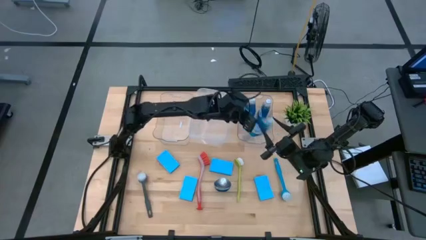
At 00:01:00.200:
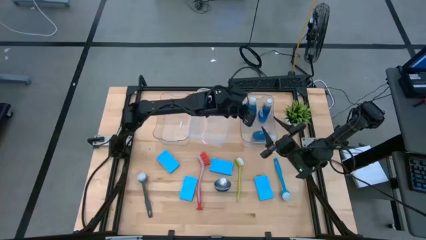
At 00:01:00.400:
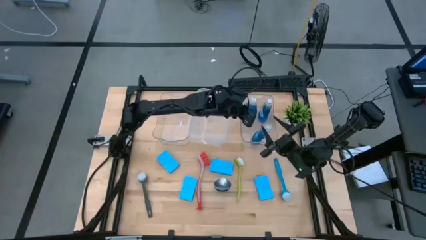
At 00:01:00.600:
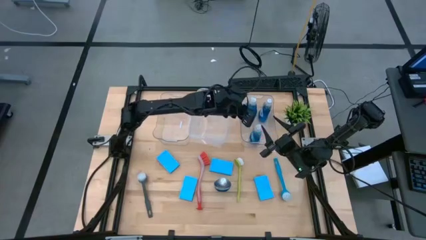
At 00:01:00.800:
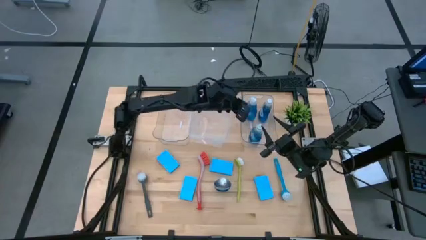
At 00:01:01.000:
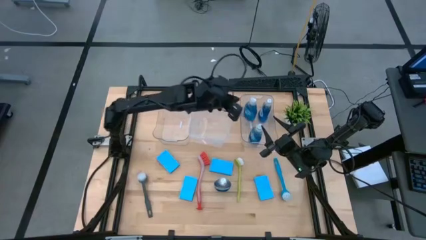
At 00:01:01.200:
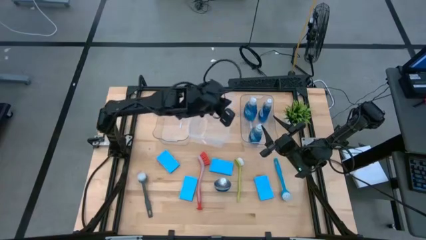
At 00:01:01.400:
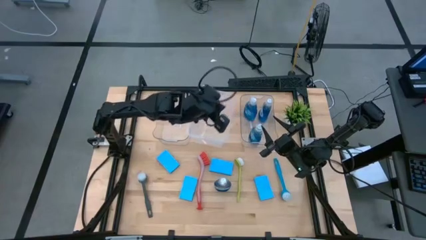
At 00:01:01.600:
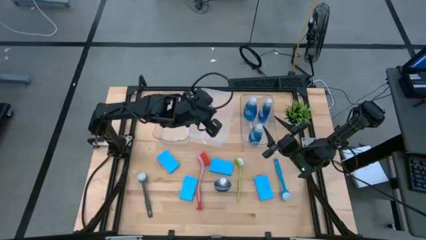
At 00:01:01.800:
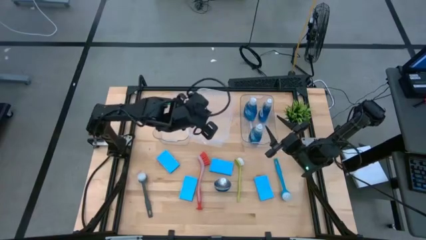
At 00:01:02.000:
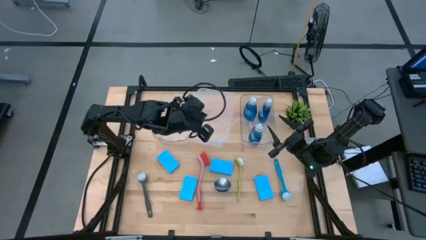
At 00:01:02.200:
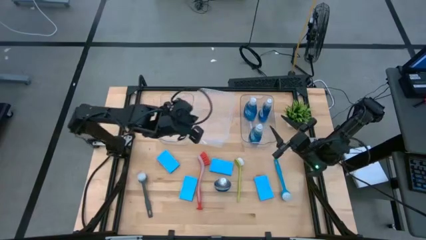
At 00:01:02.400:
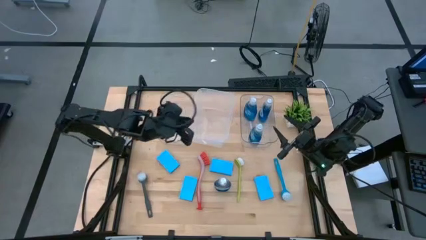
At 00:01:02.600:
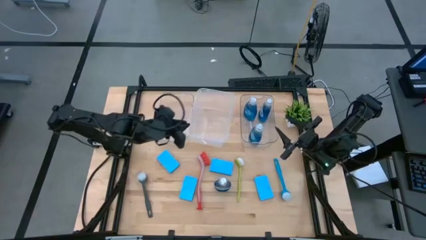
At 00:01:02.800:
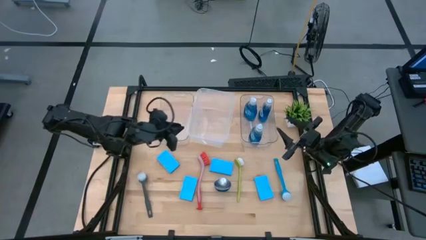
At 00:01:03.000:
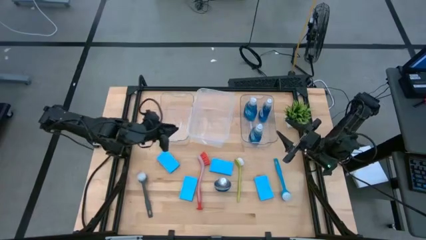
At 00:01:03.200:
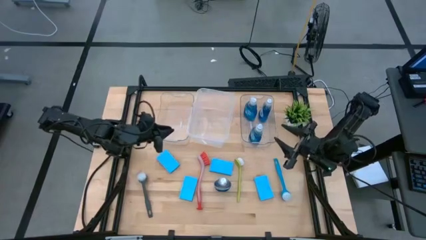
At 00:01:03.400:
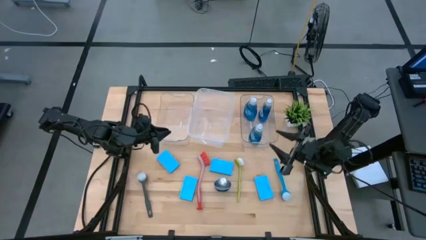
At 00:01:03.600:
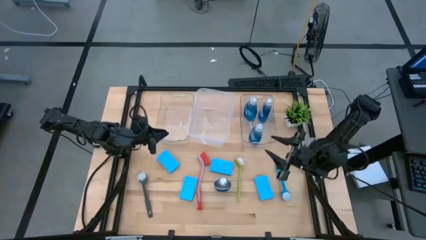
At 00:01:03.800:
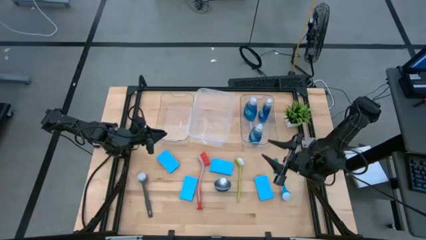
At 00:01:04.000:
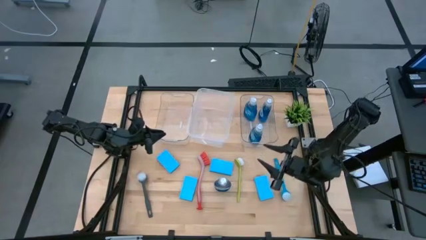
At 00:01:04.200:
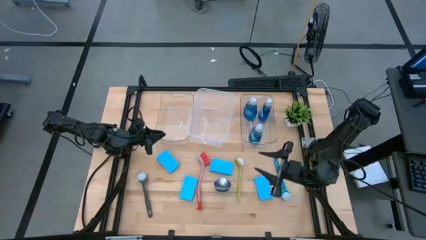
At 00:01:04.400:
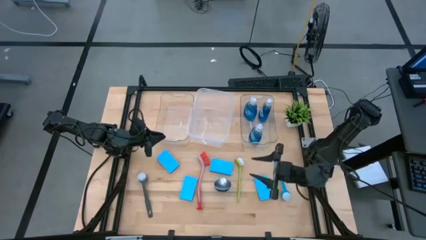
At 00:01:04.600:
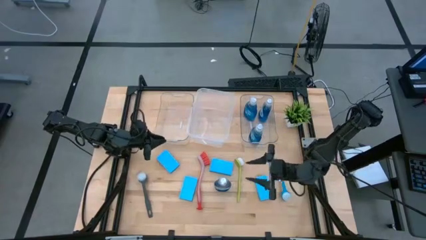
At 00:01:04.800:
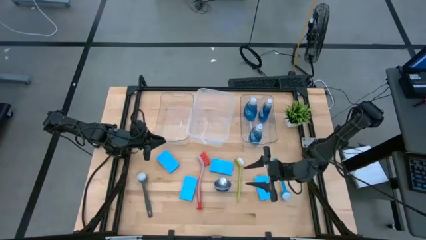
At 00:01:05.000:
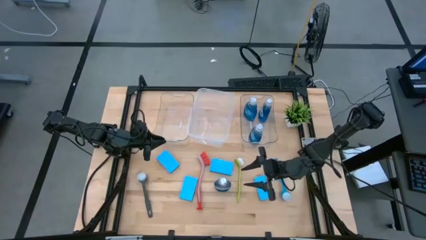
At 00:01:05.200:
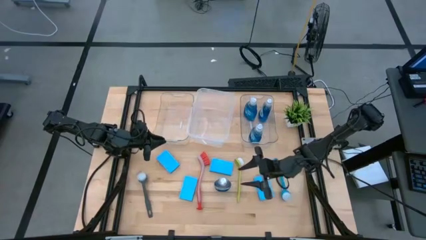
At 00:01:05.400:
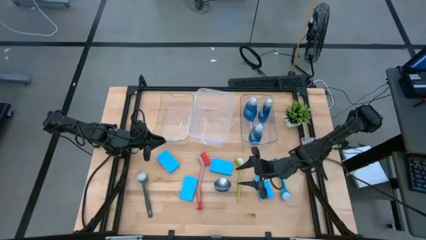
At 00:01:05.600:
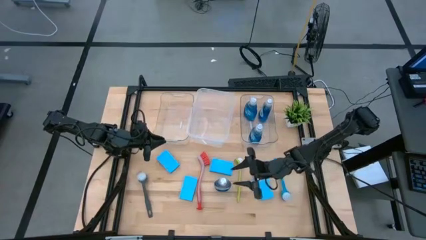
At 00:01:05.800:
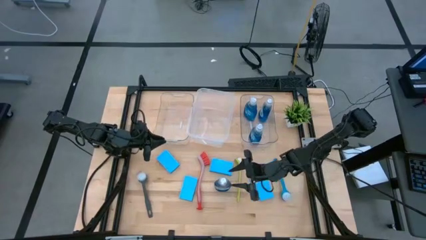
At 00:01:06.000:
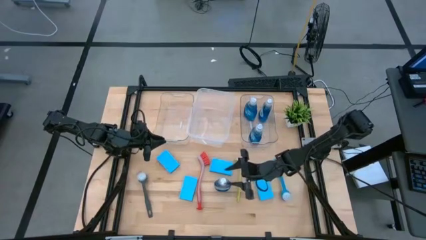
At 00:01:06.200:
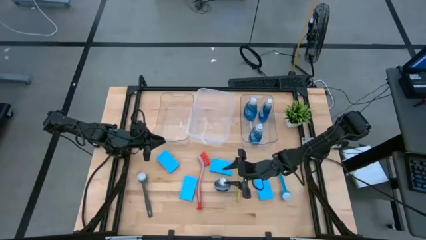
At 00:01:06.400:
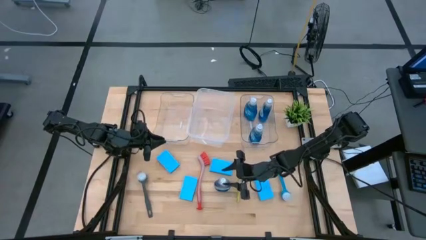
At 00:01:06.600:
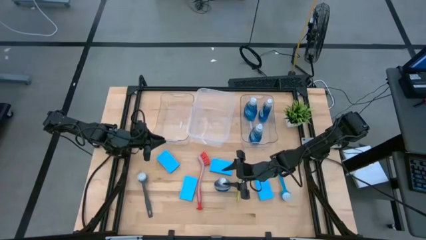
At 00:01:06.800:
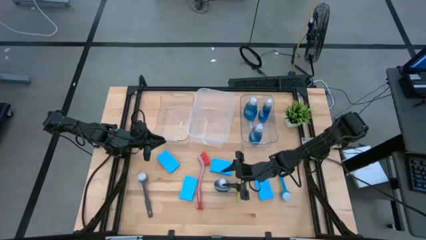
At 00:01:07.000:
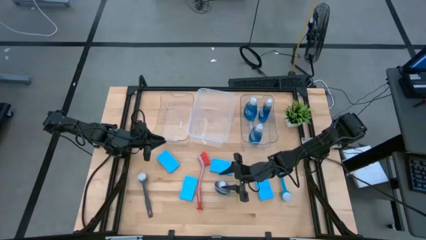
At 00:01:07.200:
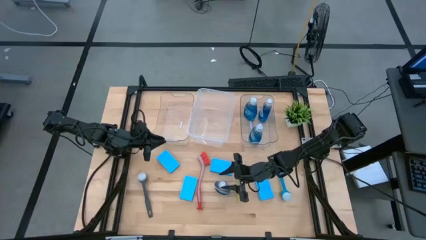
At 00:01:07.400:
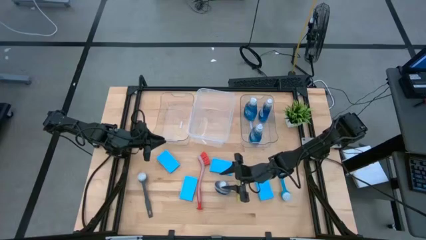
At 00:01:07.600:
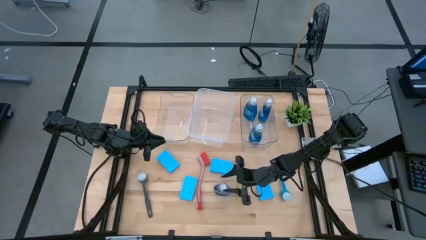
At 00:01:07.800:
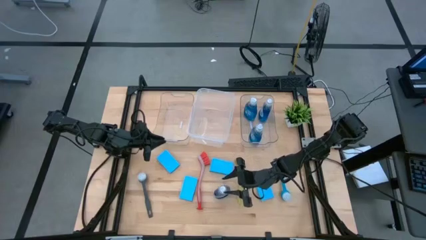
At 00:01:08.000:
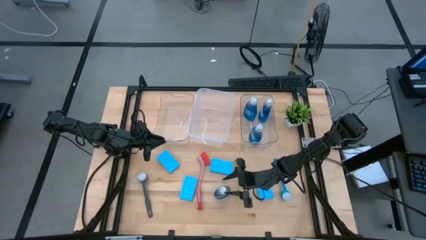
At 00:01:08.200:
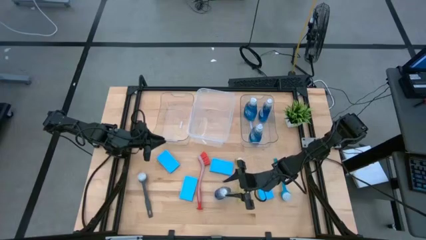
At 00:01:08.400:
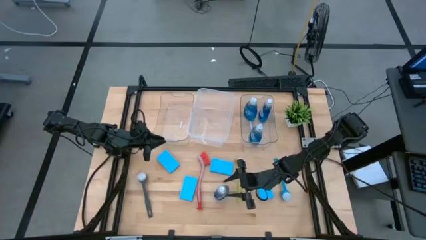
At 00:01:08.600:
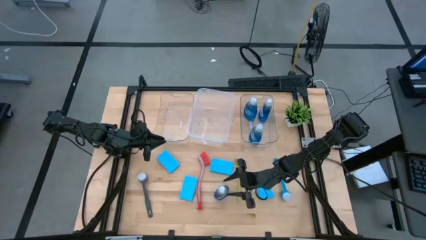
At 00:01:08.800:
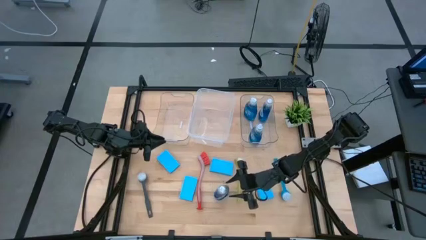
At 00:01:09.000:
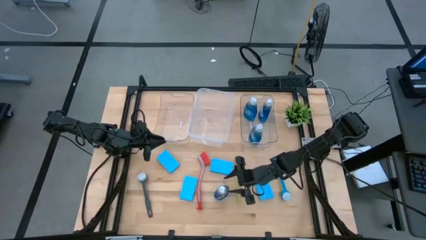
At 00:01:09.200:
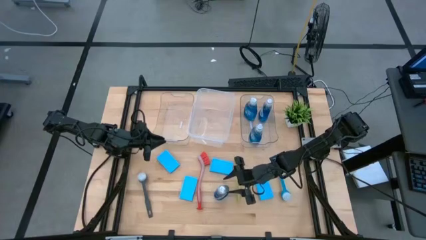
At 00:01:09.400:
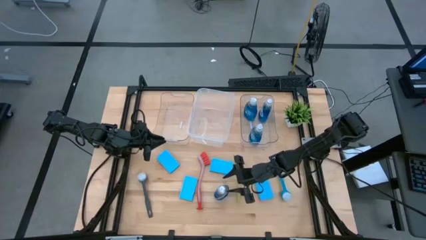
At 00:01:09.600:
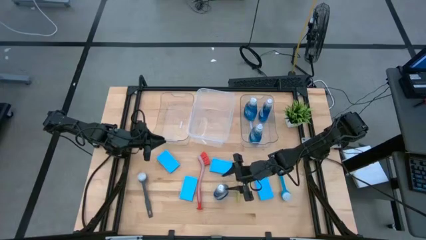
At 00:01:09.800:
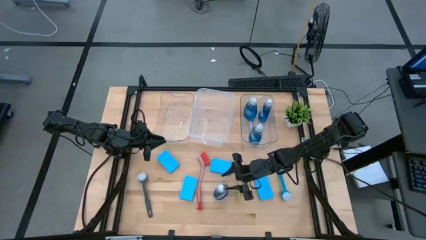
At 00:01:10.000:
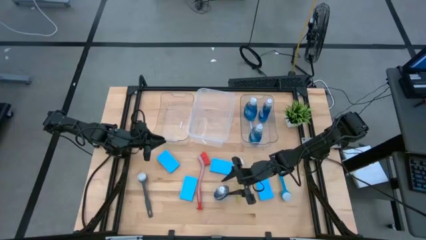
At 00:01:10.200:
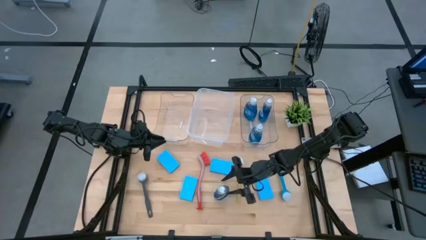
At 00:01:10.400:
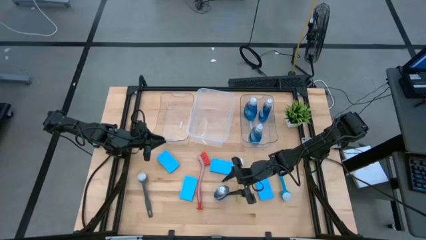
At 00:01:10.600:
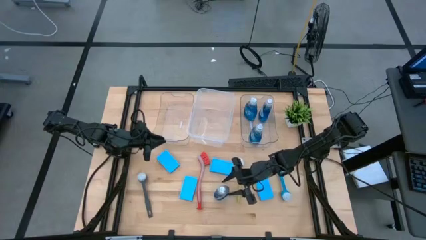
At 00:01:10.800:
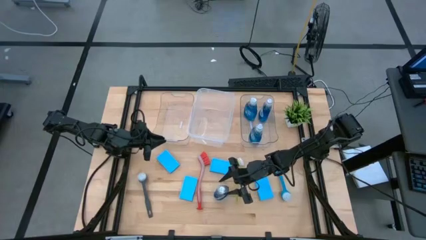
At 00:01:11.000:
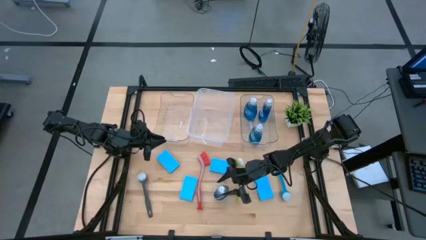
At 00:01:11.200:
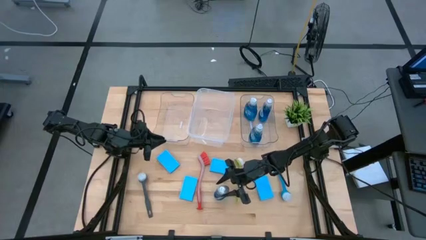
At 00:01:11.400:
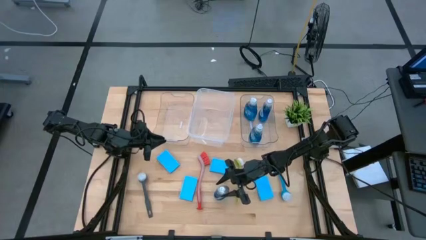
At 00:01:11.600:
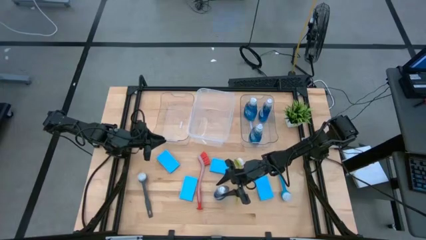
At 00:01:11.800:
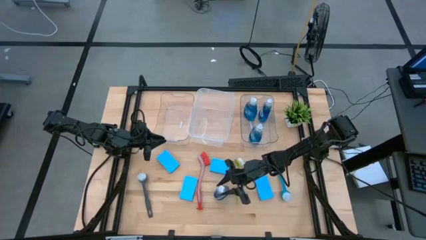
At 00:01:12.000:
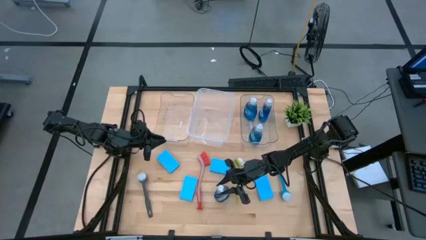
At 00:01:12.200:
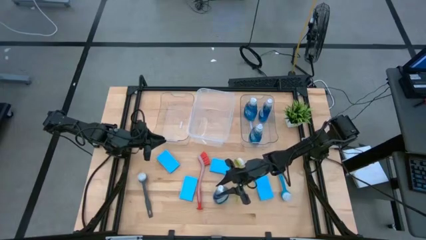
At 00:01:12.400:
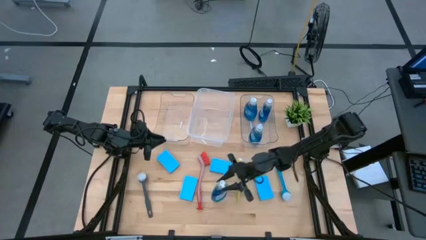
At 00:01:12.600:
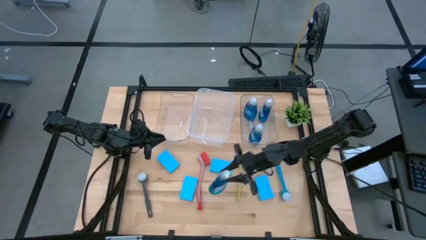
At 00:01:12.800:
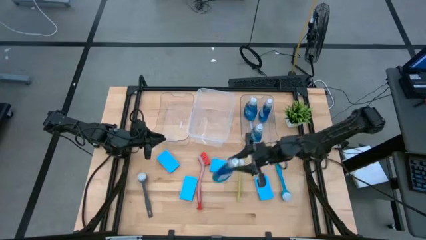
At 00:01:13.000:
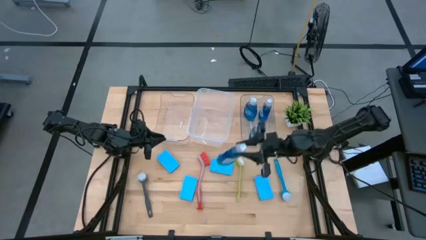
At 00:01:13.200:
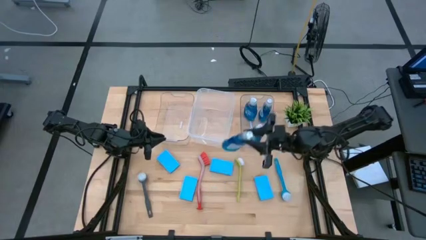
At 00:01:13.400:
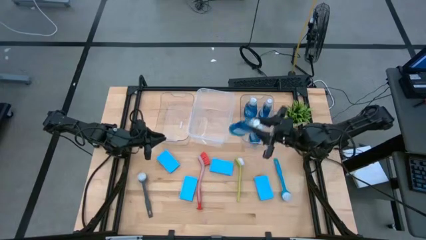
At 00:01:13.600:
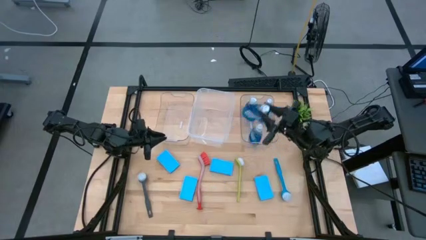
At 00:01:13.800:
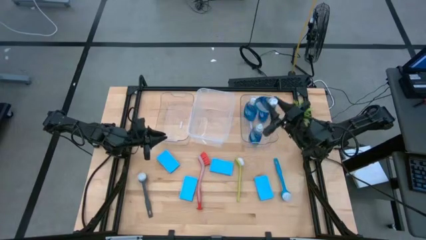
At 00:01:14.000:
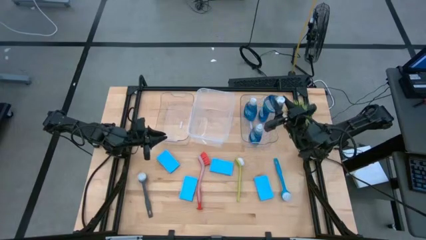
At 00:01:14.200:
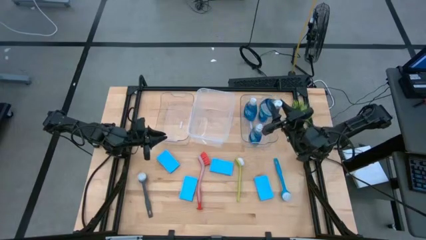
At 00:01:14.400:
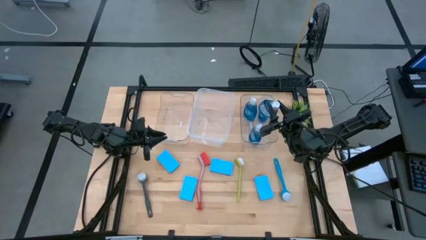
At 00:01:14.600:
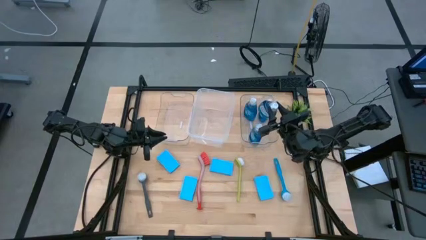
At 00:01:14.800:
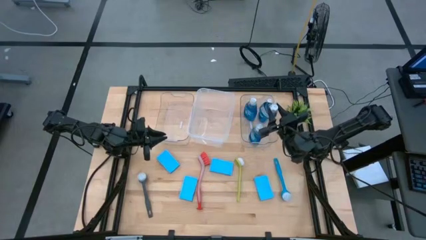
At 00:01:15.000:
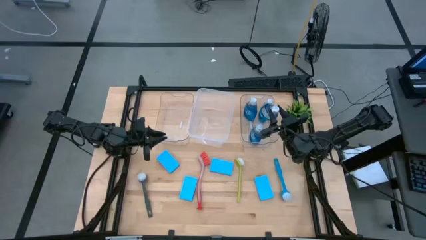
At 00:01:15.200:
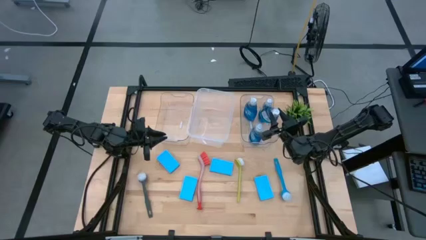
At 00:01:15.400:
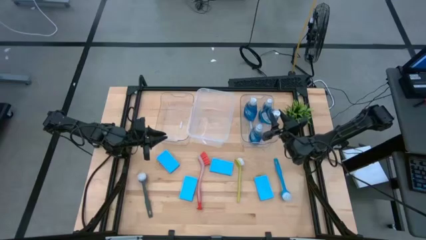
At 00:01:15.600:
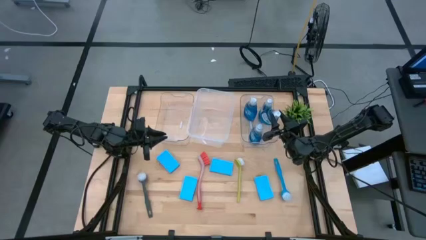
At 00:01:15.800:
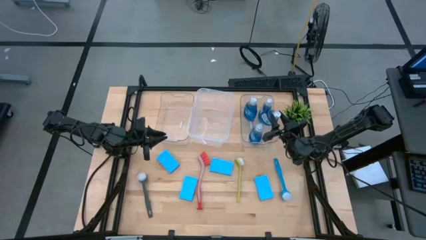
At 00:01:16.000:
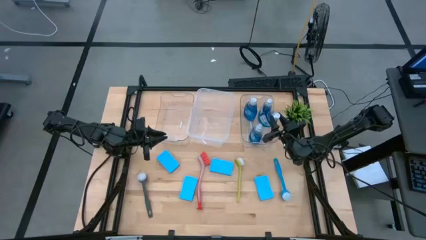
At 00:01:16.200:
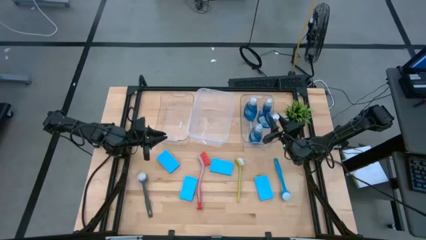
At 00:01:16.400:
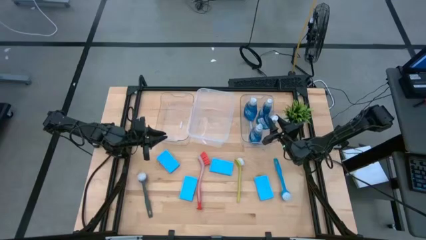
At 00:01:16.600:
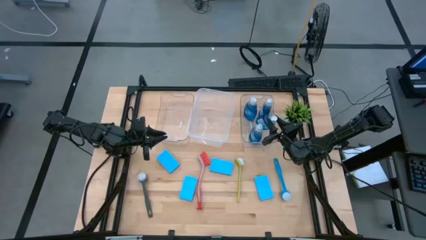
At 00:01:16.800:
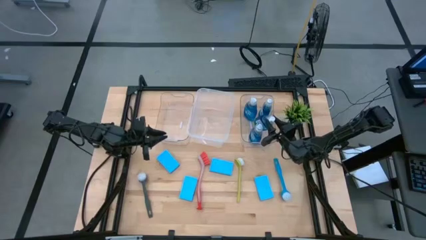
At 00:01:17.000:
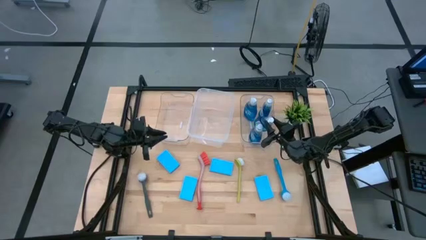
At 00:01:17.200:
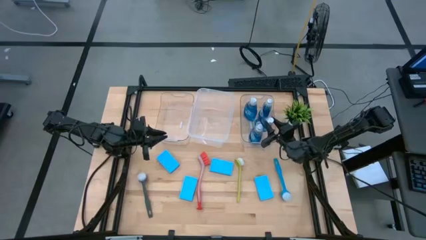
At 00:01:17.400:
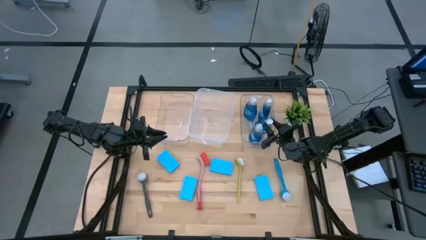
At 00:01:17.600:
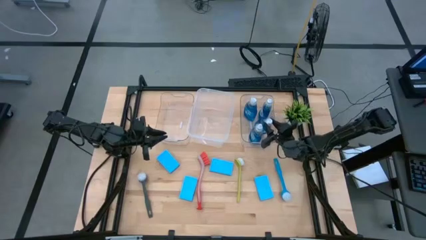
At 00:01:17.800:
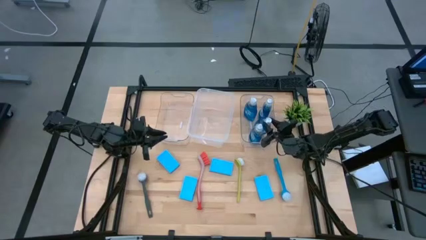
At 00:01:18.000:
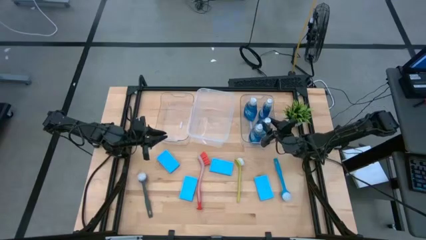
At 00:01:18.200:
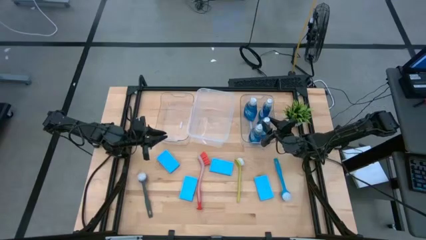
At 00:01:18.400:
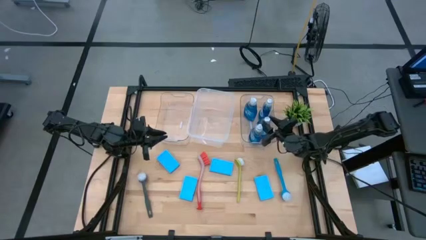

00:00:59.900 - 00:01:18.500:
Task: Pick & Place Kitchen Sink Supplies
Put the dishwashing liquid into the right transparent bin
